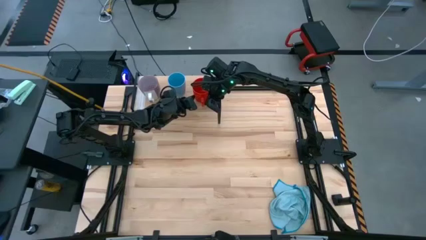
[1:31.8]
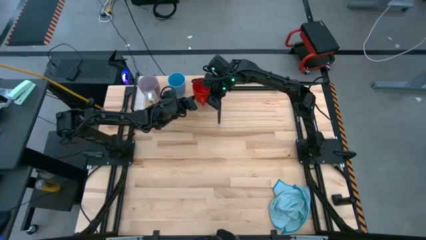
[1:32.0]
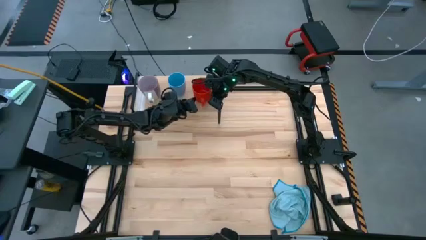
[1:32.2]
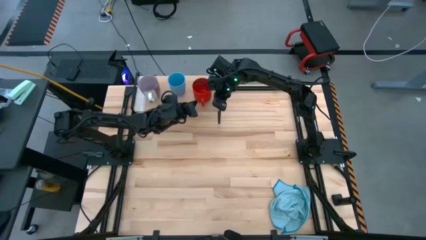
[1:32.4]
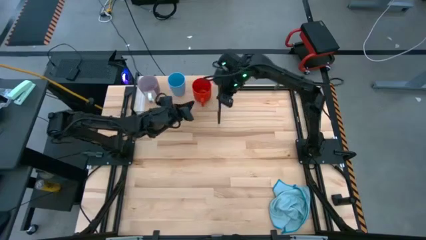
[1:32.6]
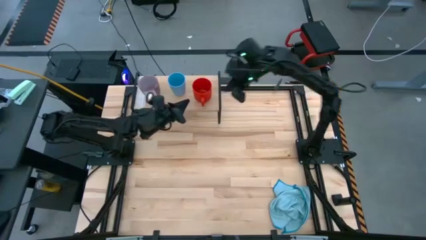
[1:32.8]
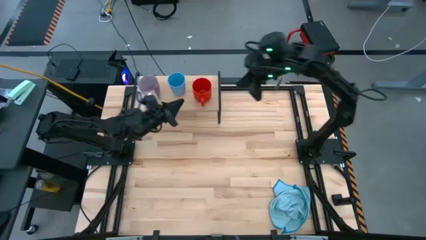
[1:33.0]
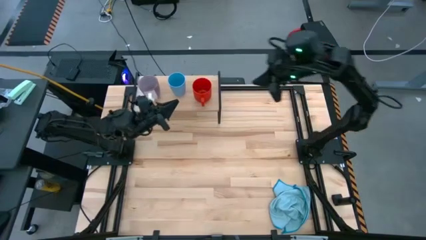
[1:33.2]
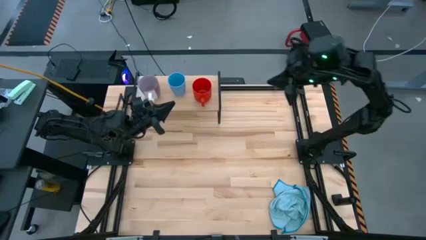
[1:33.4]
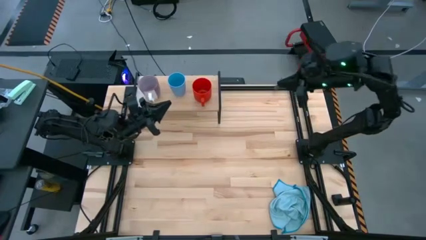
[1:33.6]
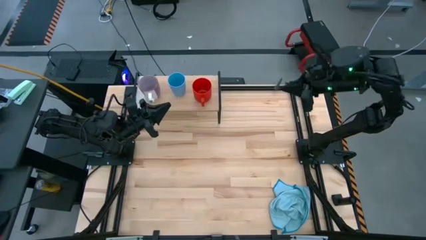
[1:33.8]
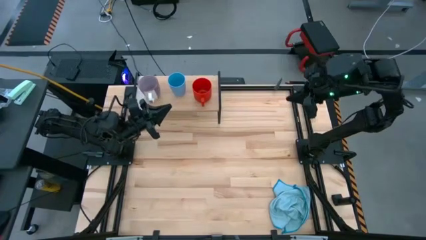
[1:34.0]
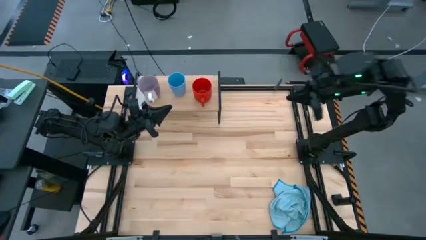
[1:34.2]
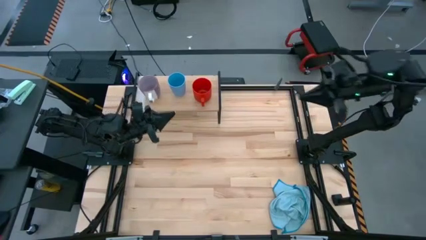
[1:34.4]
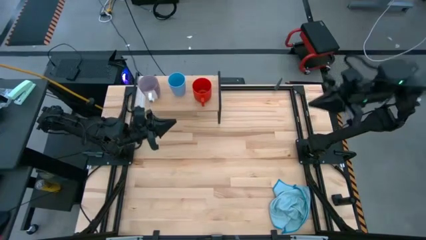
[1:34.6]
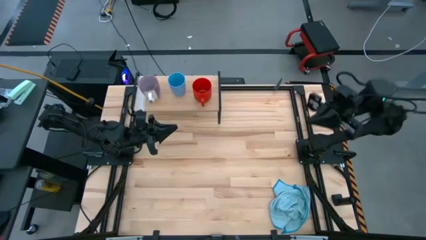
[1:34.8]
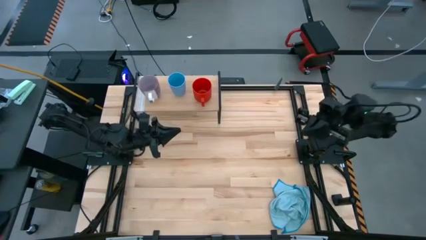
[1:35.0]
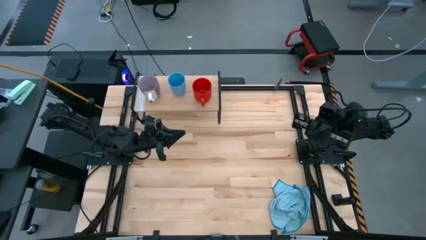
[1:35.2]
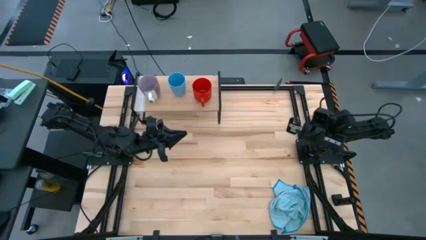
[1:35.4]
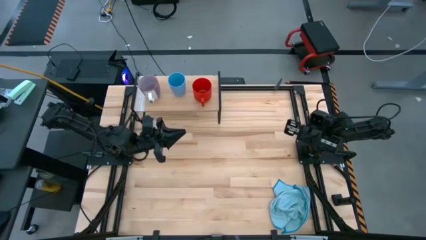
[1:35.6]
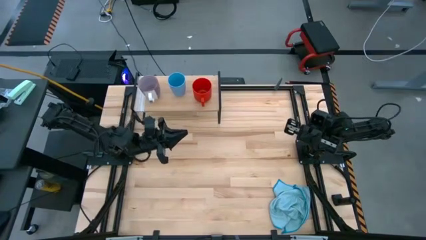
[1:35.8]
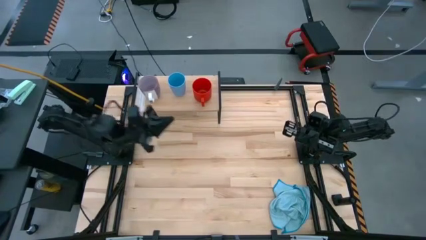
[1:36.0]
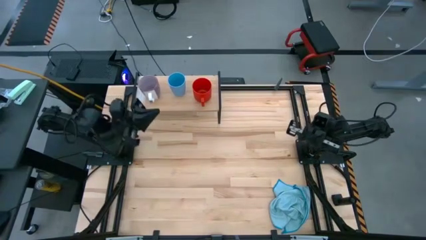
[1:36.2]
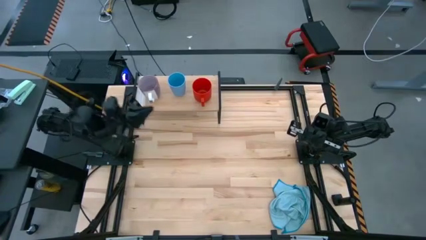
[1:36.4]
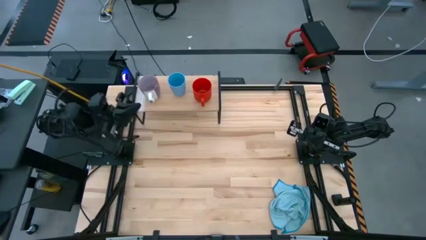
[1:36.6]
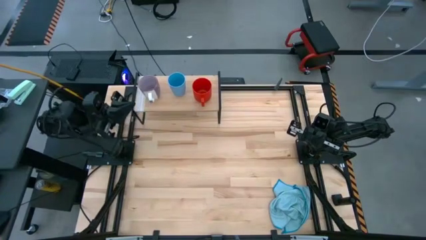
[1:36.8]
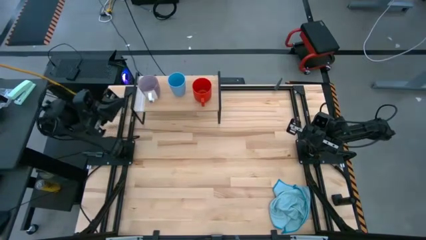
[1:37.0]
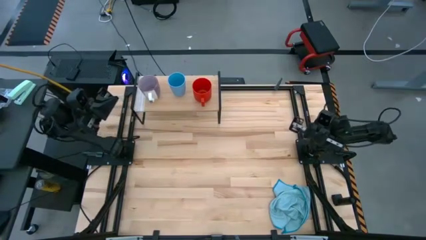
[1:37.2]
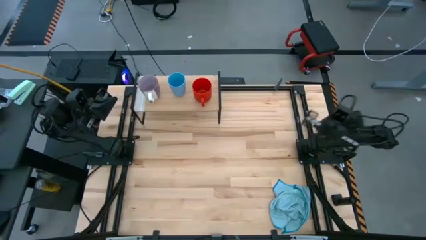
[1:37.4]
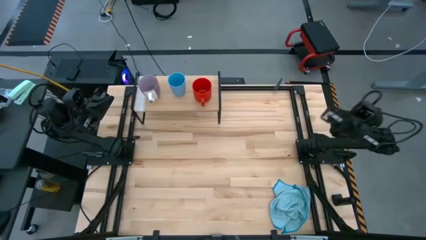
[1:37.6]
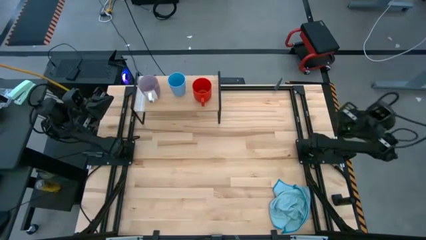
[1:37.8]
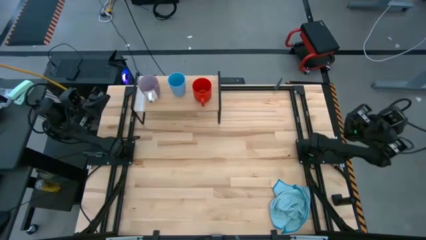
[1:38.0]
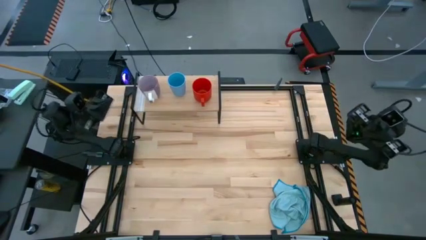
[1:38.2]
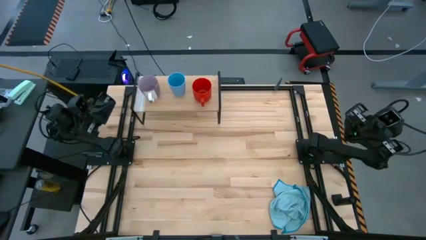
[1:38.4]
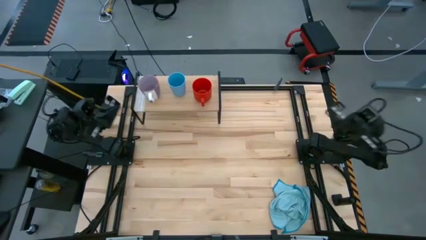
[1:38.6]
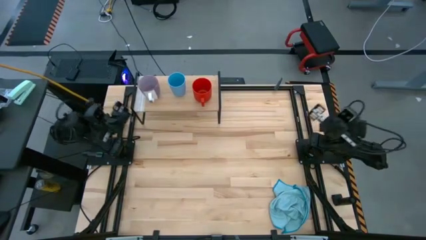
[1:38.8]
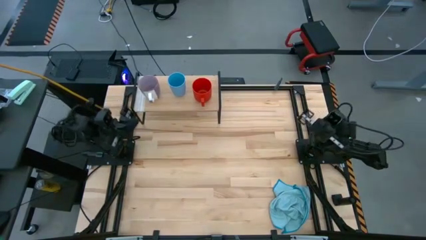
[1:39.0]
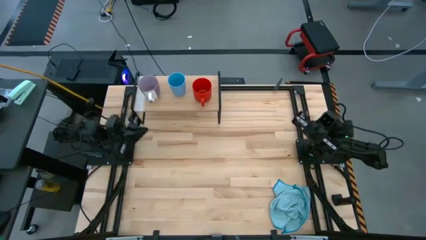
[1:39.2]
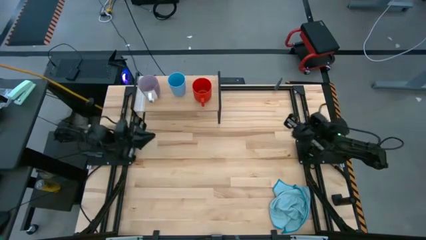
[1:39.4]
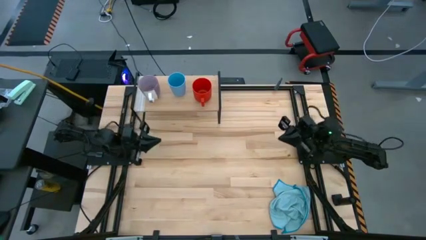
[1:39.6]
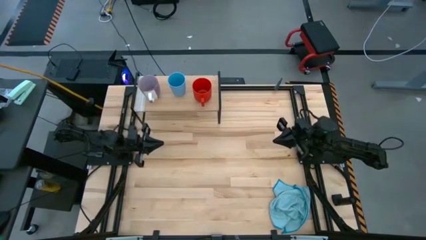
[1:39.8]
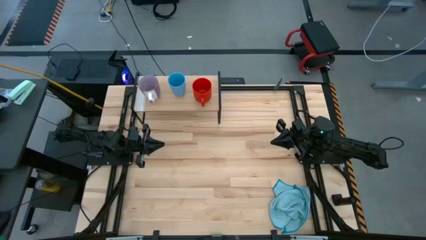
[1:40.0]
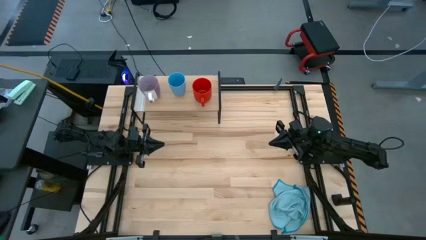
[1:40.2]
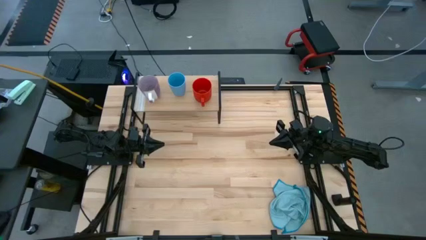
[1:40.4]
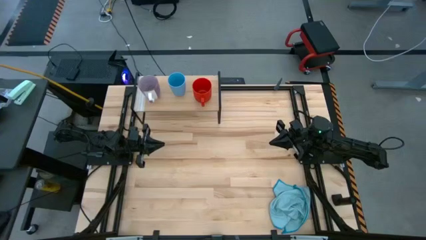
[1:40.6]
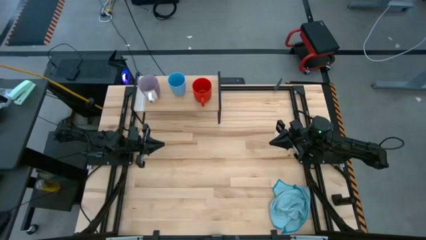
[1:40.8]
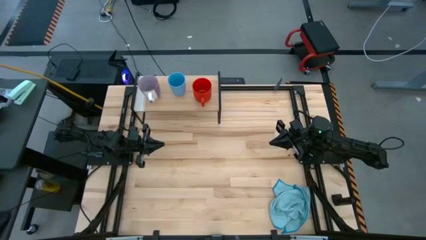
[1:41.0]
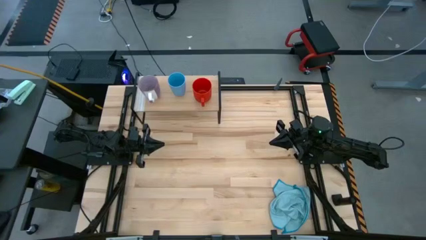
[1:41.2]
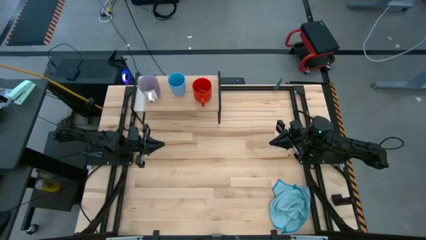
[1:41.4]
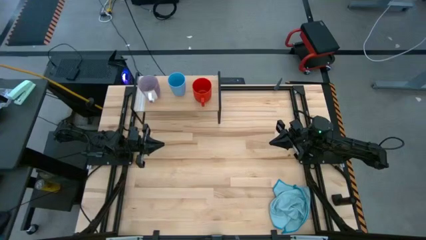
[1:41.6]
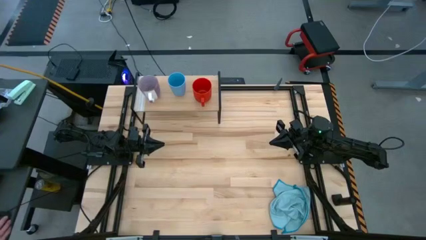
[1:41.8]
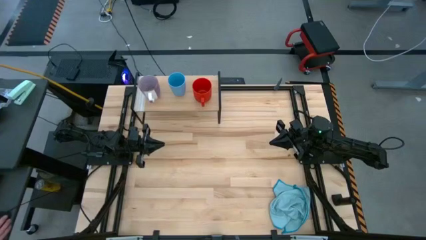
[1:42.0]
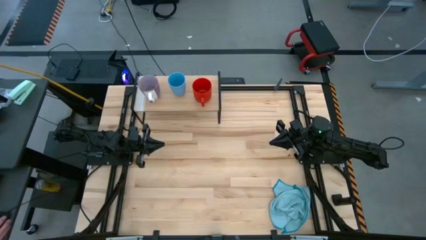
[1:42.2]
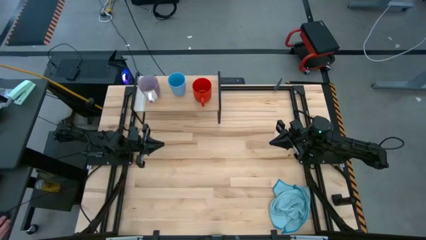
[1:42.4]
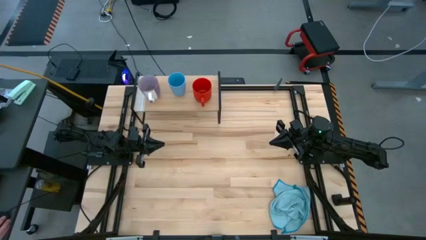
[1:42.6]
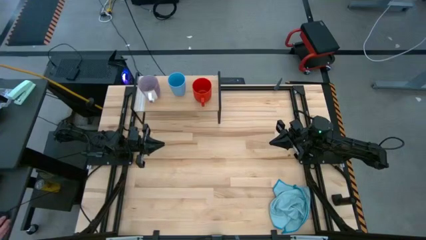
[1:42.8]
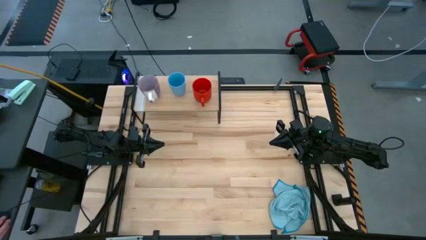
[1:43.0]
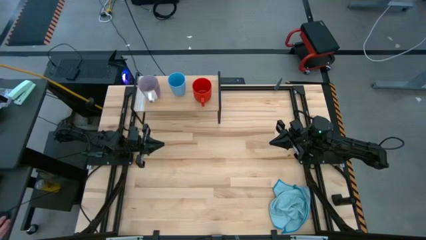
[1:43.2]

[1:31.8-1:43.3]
Task: Stack small to large cups/mugs on shelf
Return to Home Position
